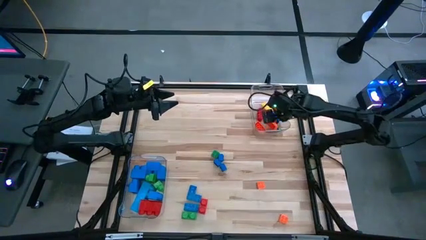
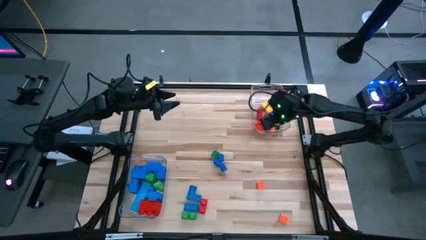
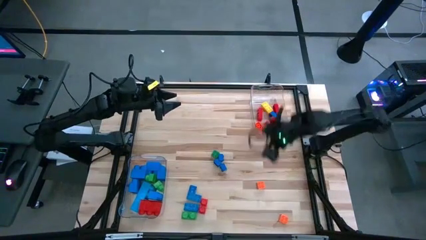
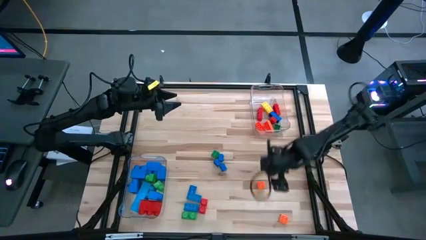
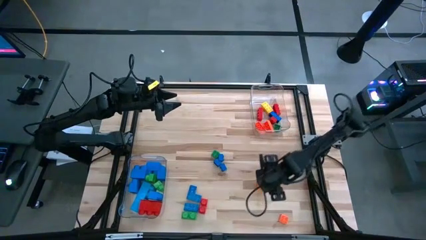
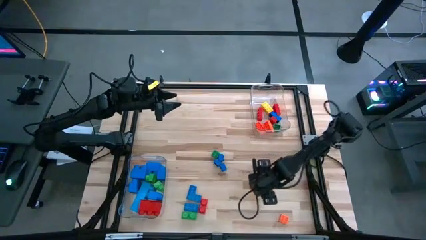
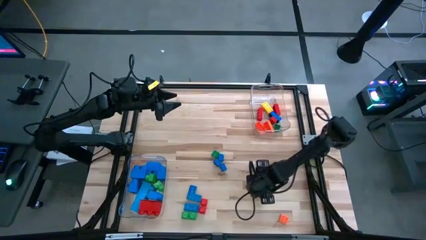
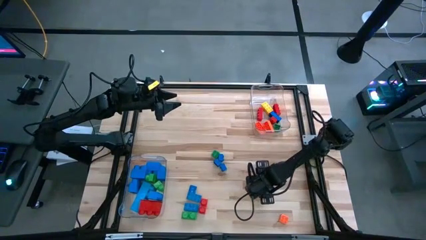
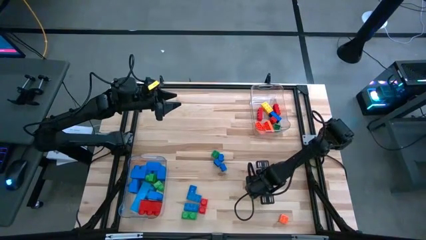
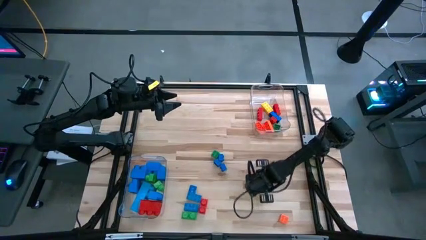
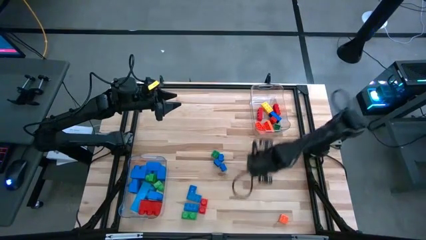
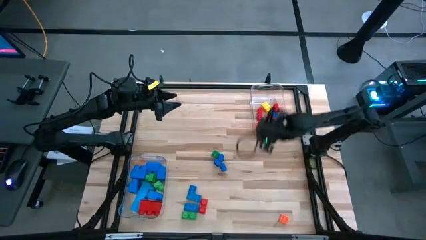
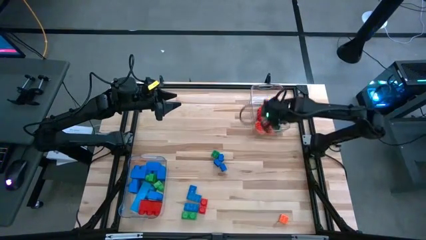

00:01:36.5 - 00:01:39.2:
Task: Sort blocks by size
Put the small orange game piece into the top transparent bin

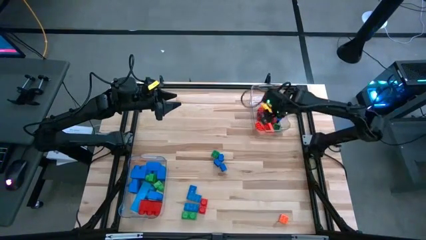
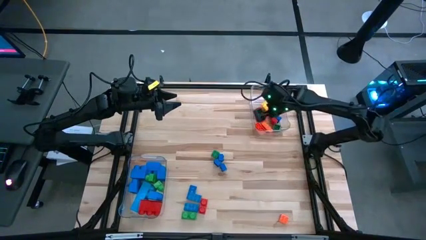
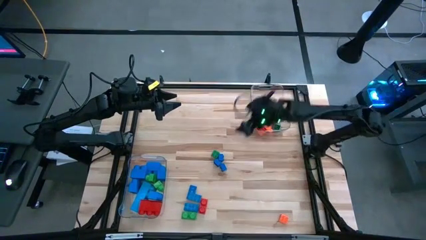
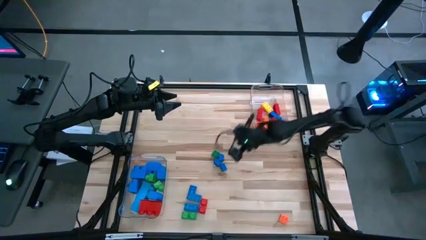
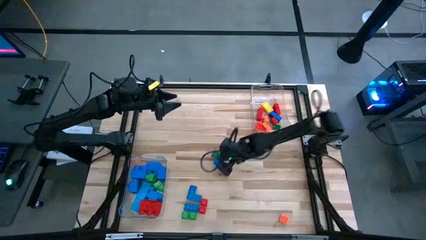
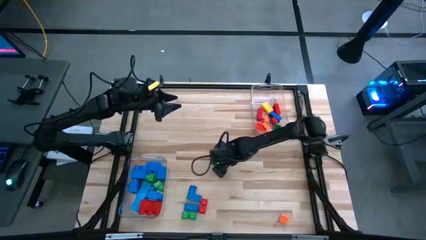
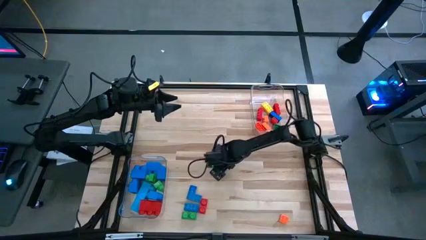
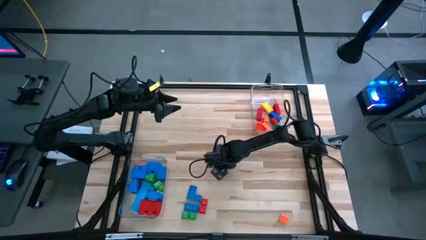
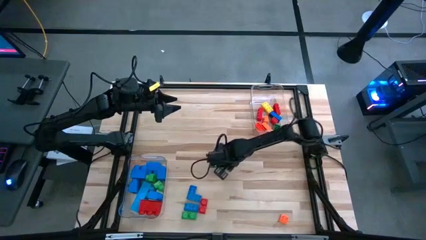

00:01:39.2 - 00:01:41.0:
Put the small blue game piece into the top transparent bin

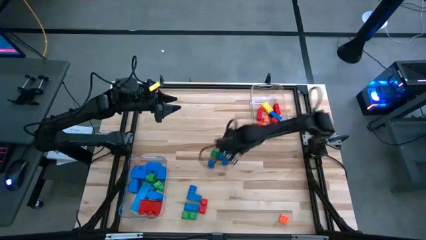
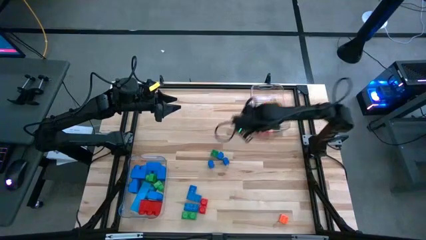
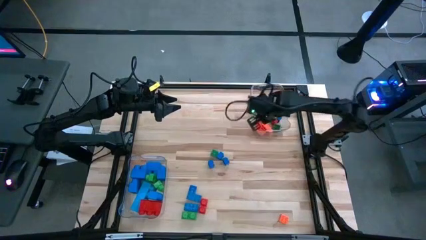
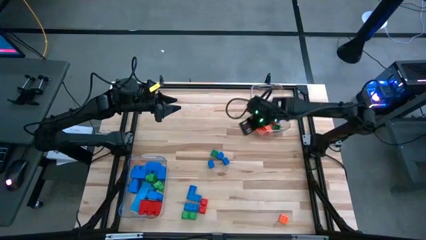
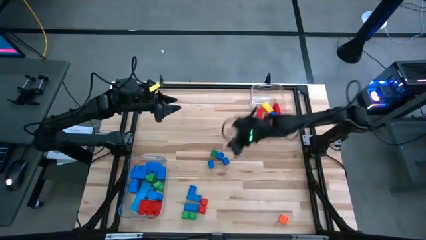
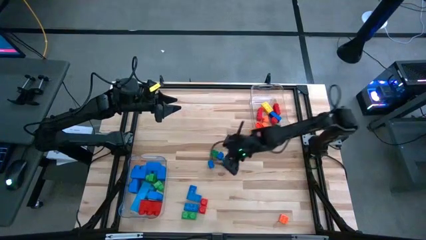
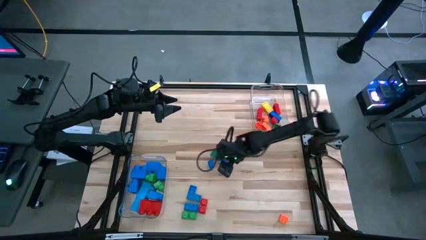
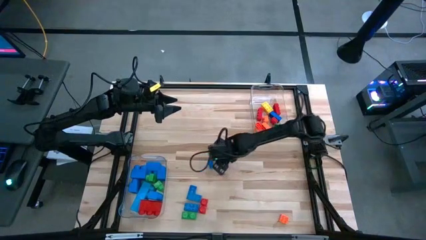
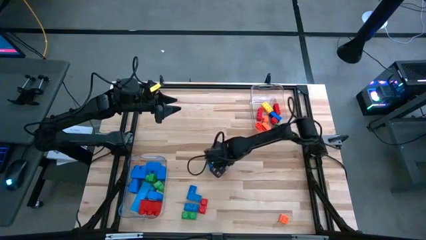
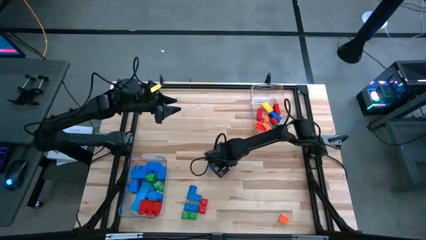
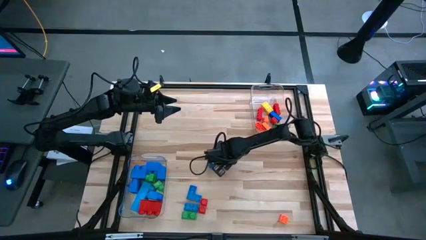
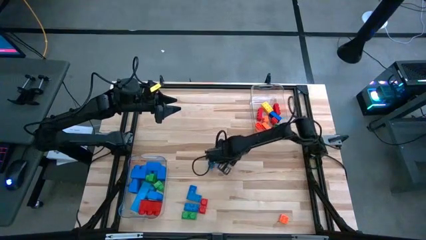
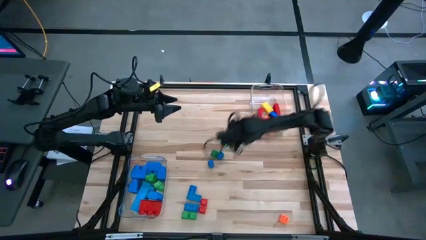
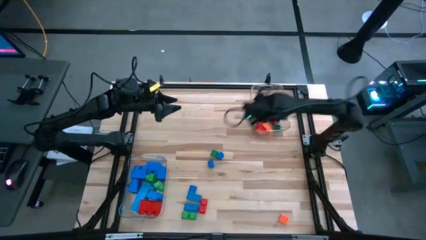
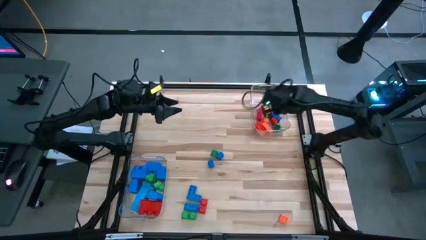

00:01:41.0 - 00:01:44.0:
Put the small blue game piece into the top transparent bin

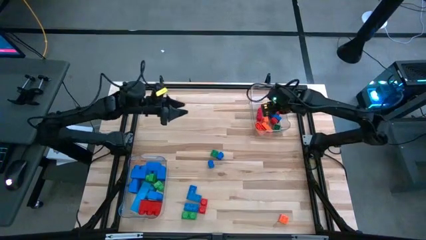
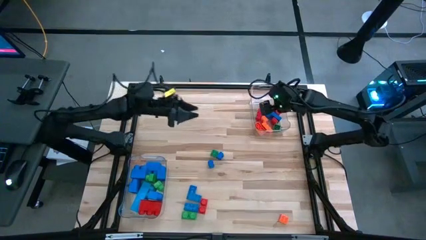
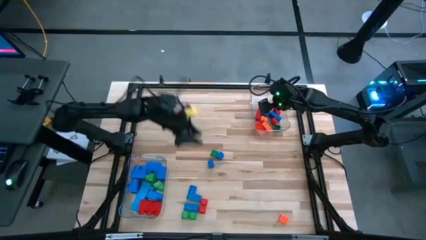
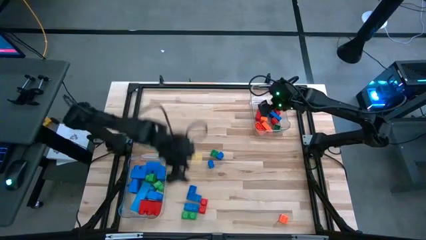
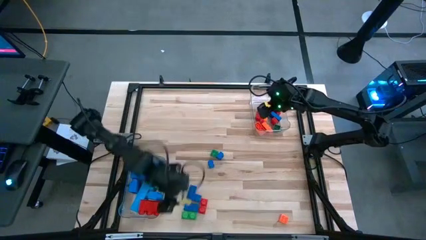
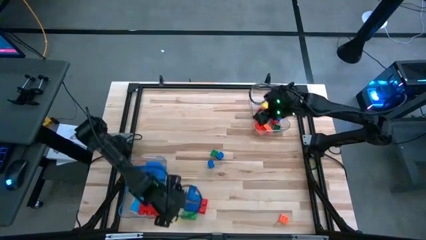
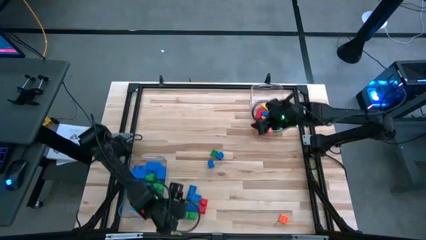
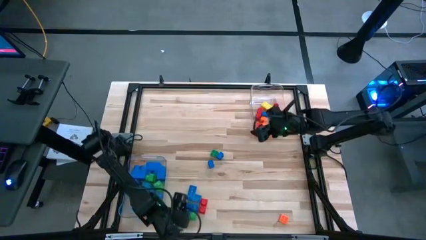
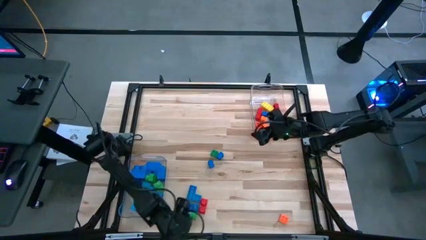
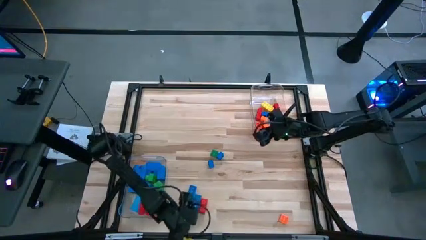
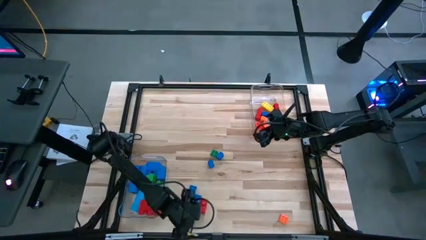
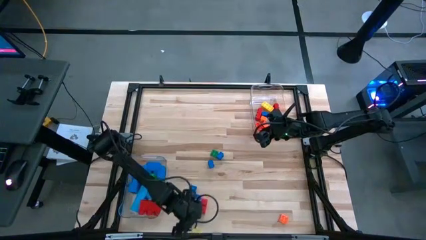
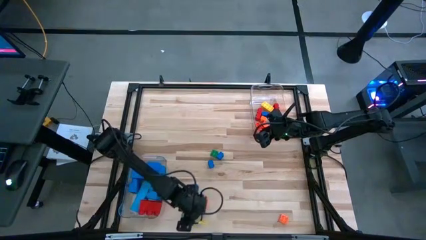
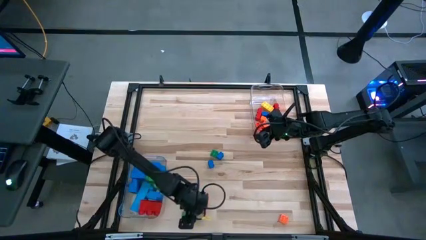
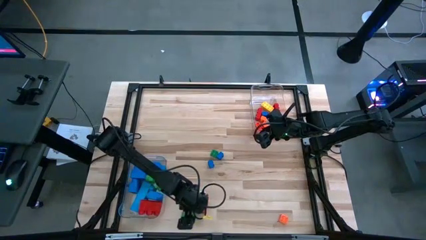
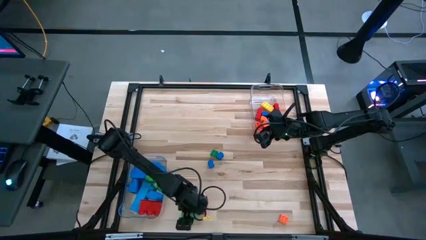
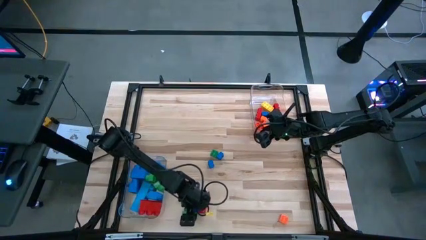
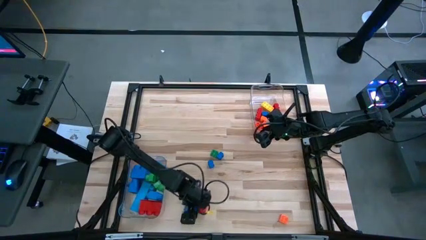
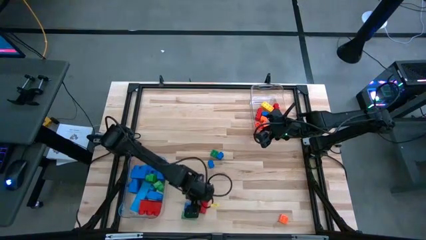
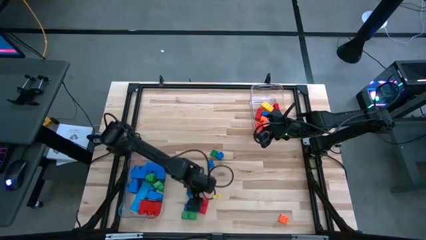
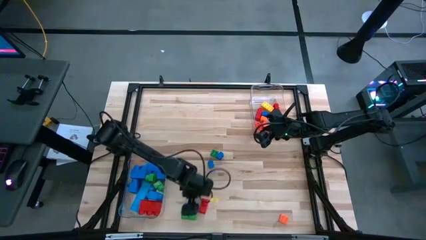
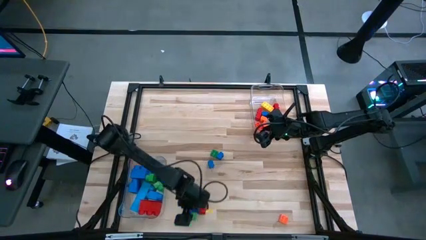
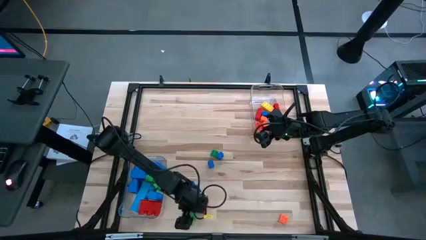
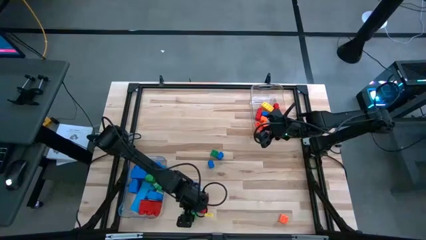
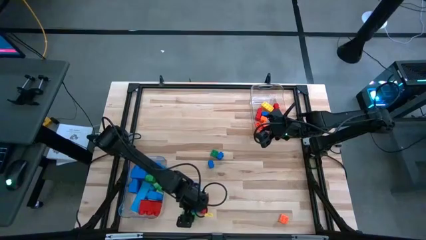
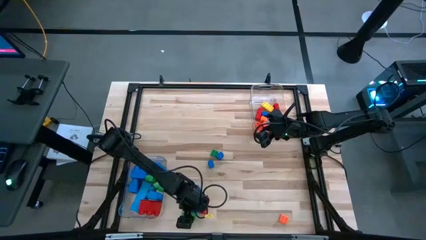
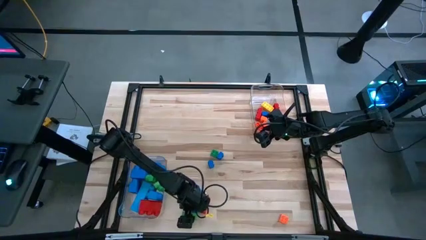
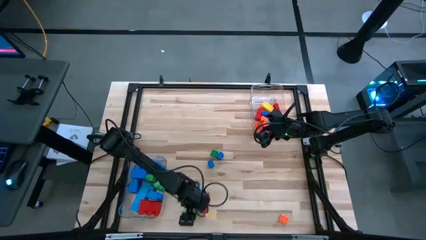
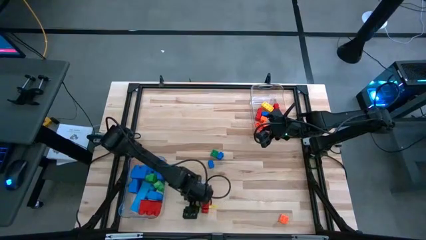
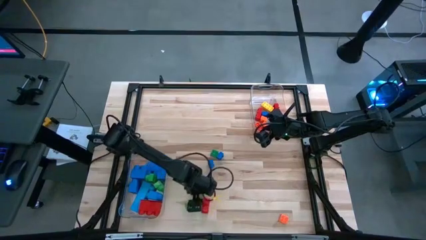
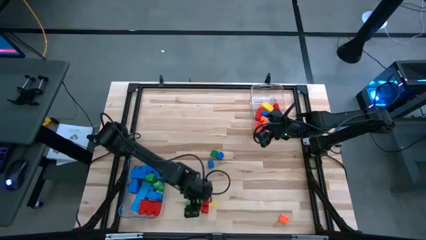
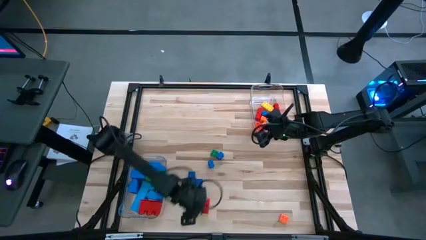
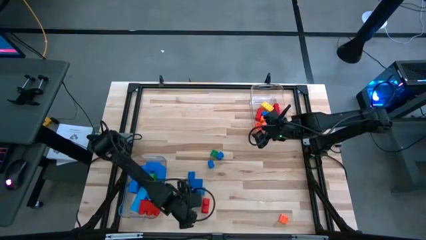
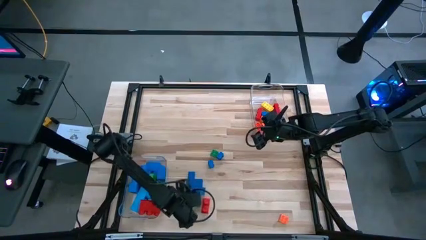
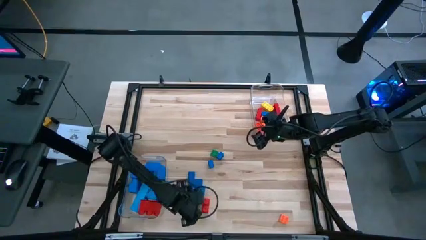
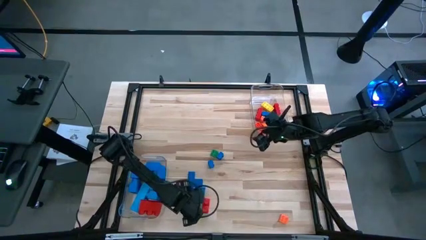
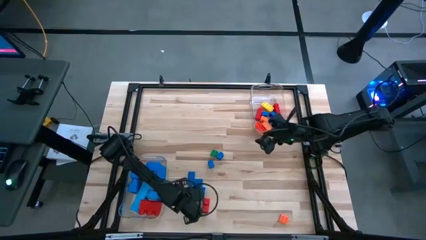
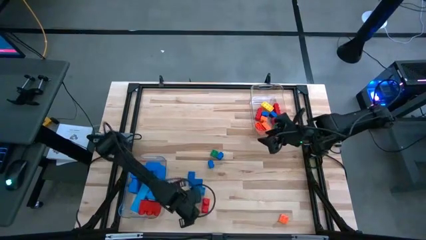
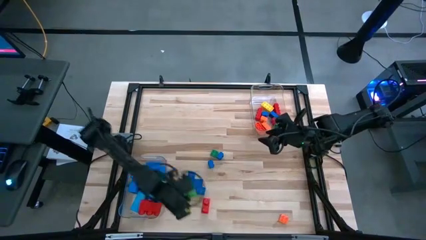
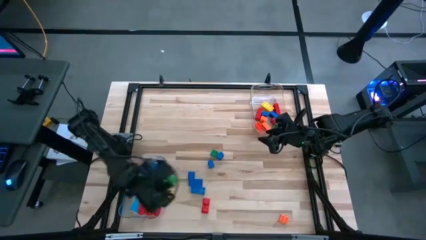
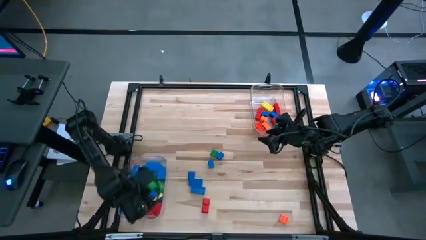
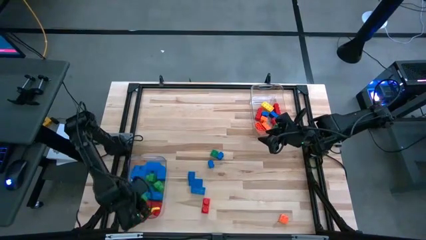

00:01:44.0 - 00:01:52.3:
Put the large green game piece into the bottom transparent bin

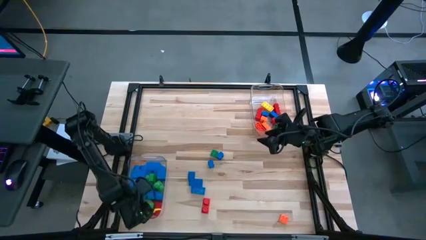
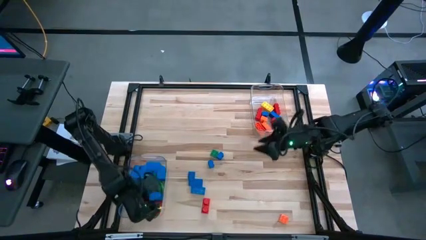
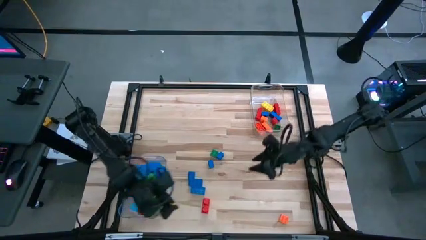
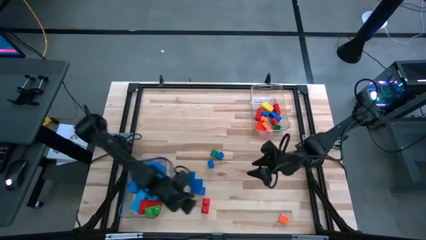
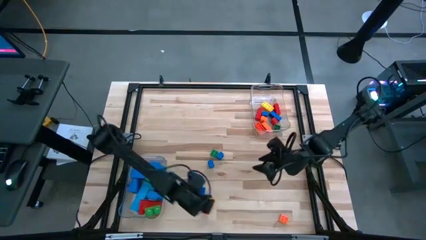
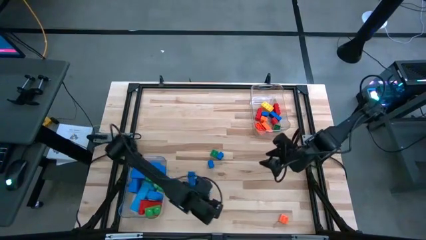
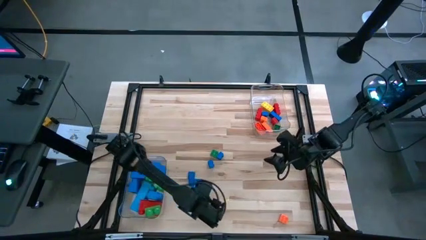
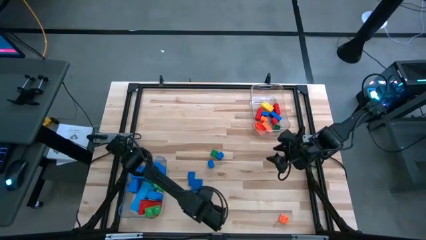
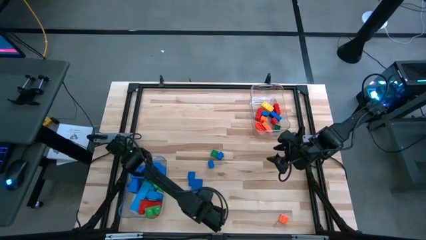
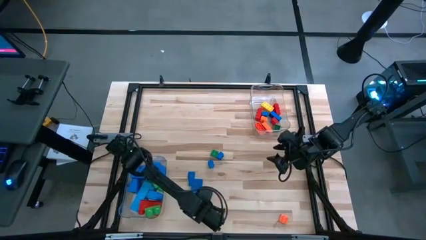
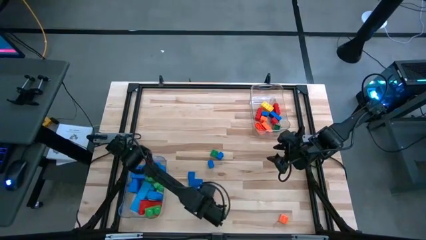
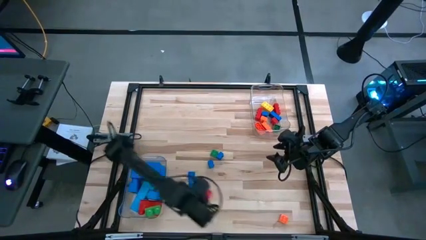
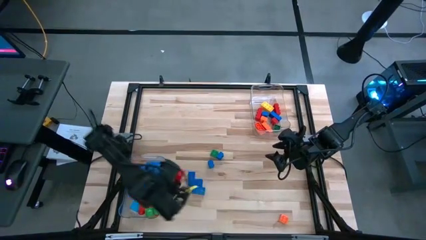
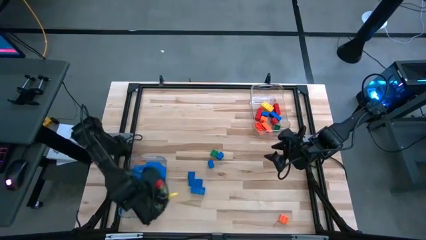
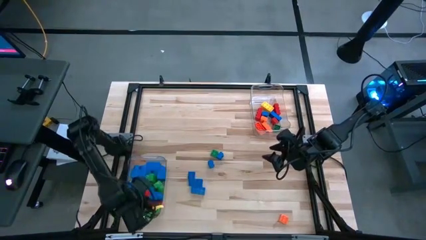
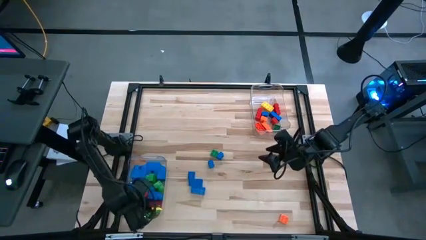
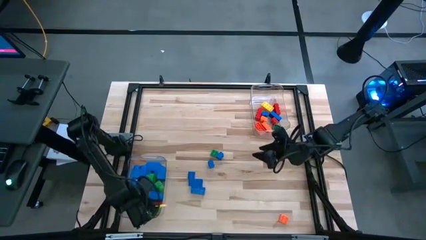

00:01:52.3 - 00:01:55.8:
Put the large red game piece into the bottom transparent bin
